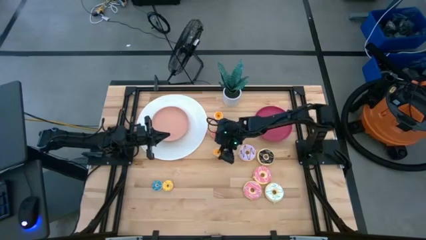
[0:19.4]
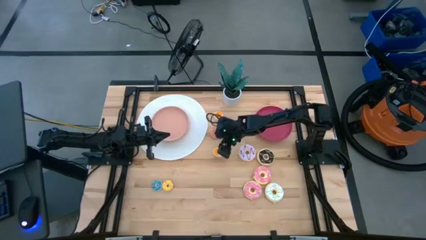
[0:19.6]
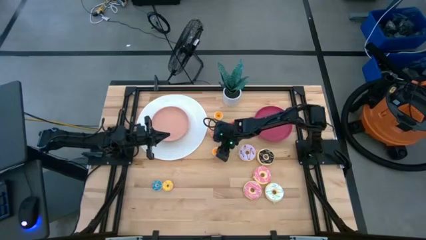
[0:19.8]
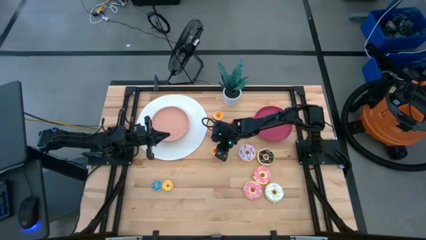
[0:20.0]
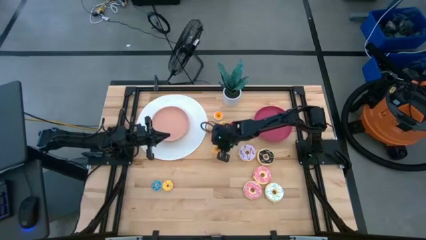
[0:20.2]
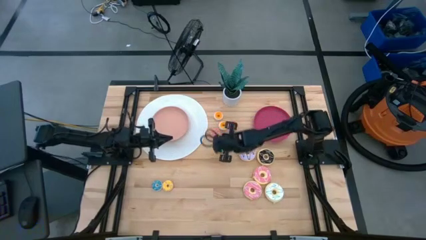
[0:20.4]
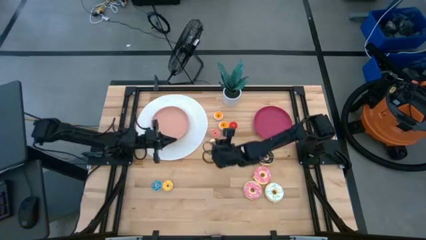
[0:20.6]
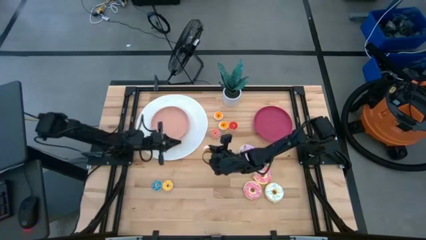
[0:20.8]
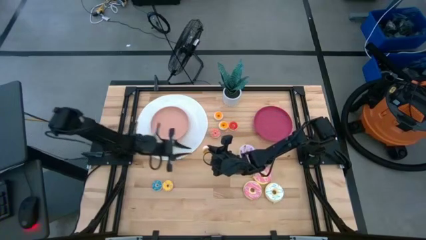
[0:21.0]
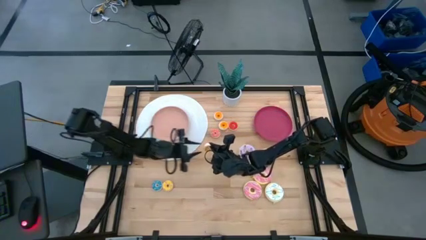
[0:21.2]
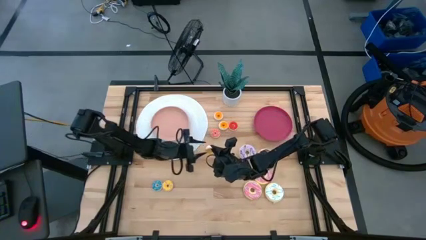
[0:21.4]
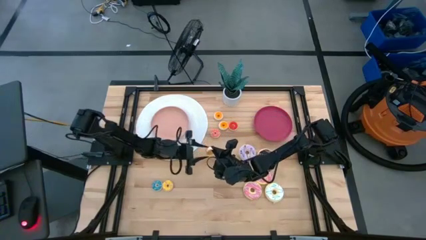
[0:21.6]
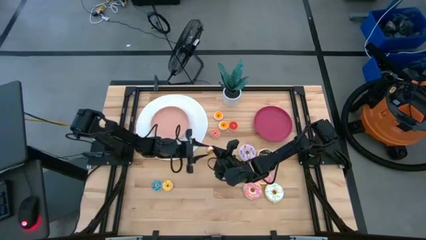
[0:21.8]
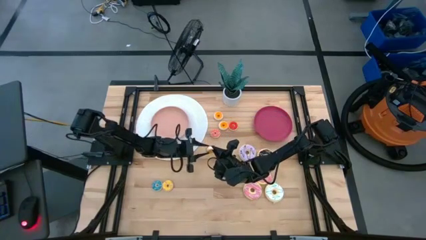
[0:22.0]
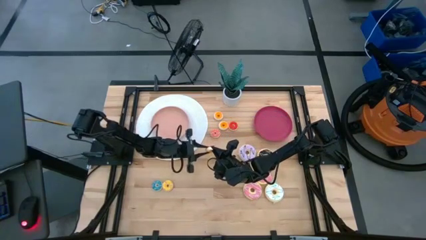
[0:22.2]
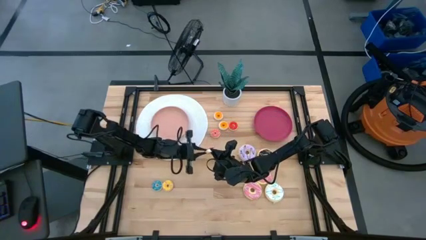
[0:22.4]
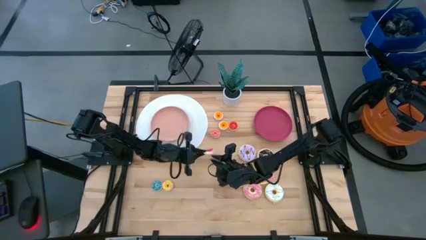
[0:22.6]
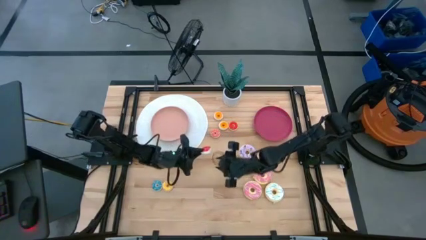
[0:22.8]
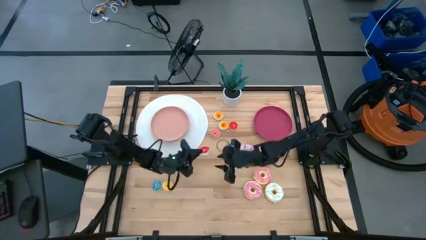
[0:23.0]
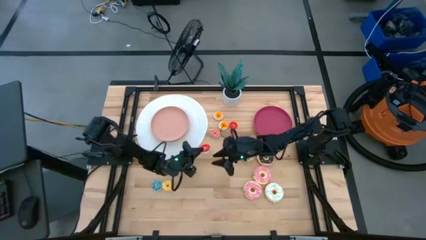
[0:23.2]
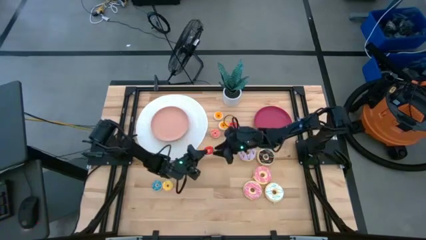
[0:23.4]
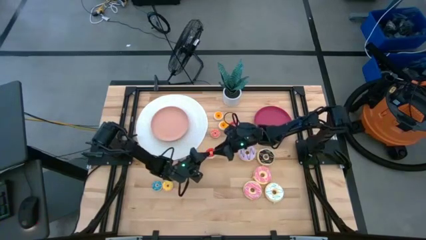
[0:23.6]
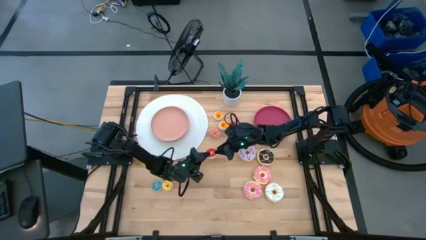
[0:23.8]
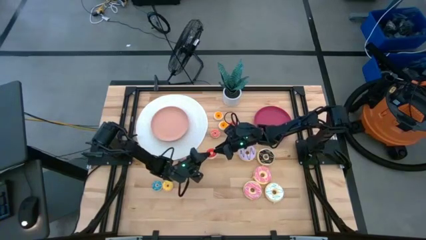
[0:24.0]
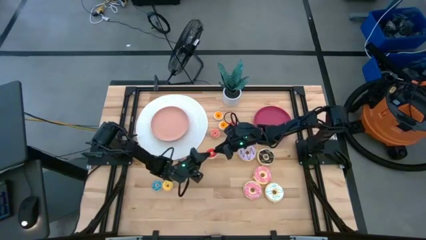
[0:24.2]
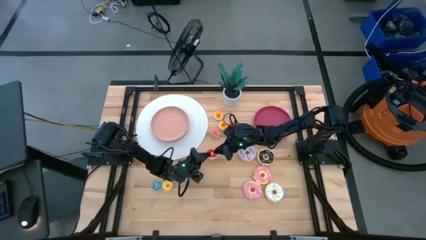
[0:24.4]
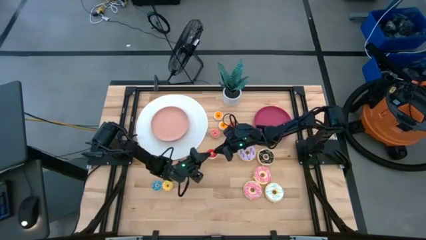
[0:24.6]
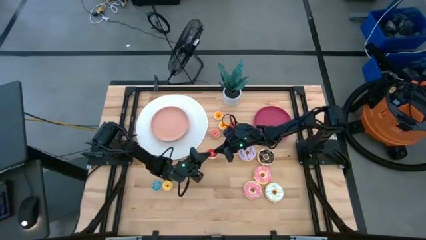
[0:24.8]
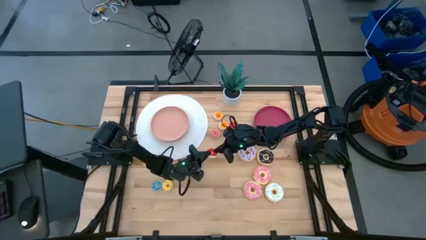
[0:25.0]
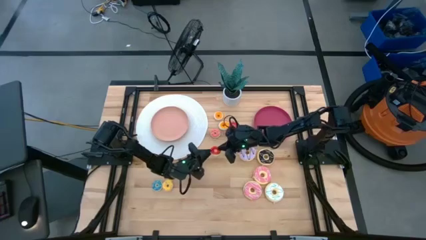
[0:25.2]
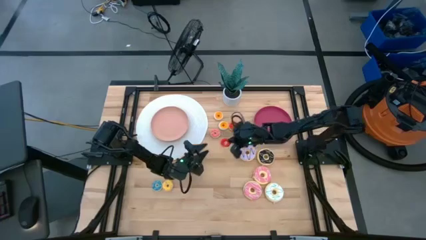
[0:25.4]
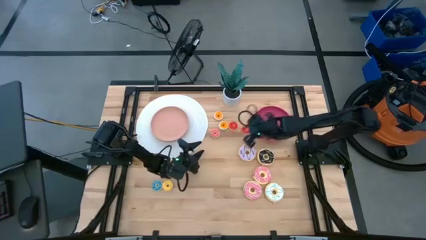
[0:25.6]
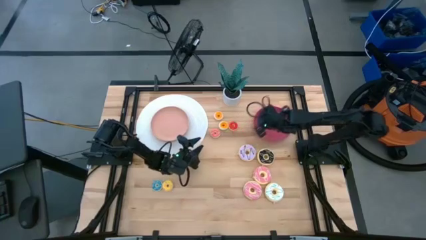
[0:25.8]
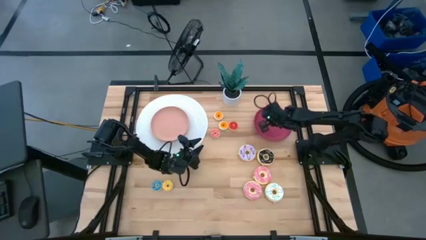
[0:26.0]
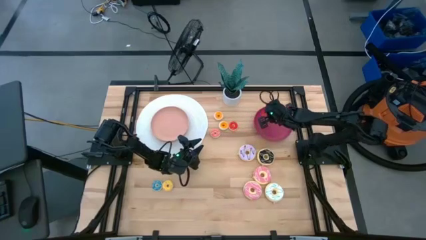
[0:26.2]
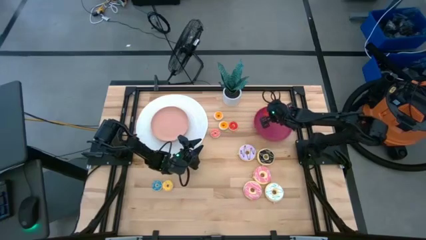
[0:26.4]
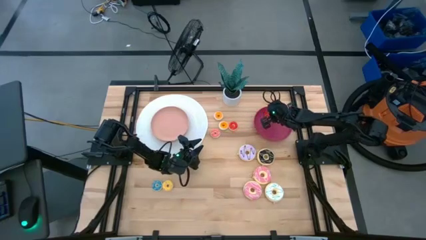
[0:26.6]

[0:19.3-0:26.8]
Task: Pick & Place donuts
Put the bottom small red donut on the red plate

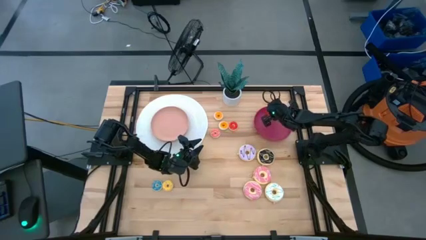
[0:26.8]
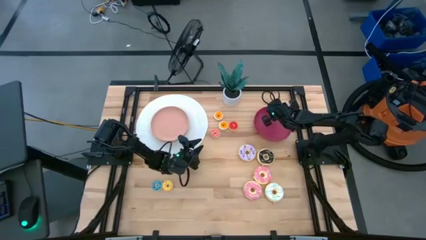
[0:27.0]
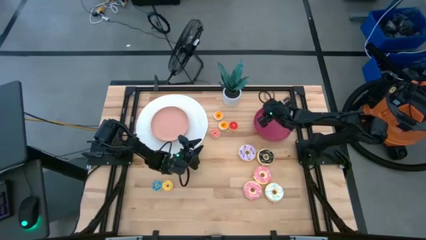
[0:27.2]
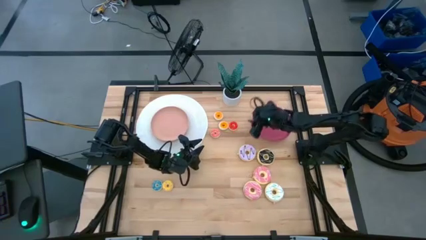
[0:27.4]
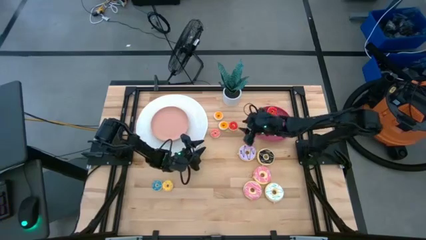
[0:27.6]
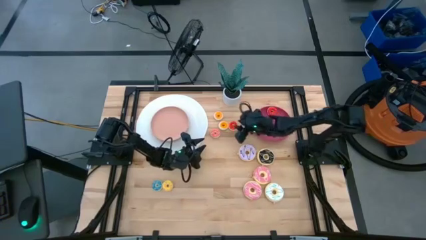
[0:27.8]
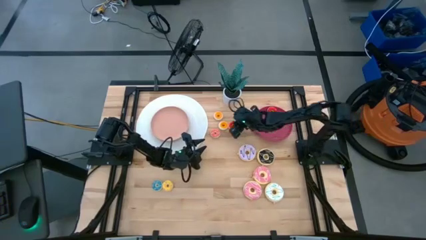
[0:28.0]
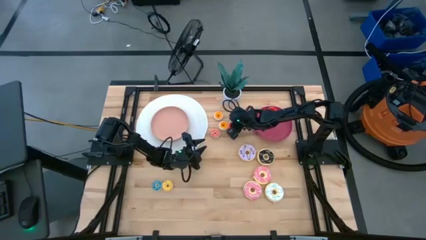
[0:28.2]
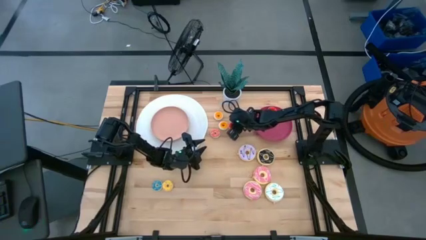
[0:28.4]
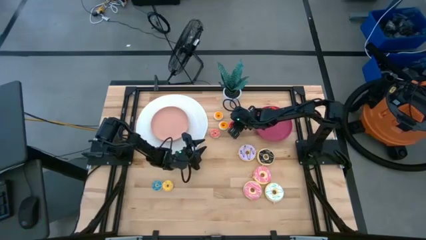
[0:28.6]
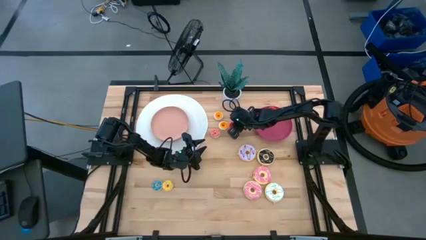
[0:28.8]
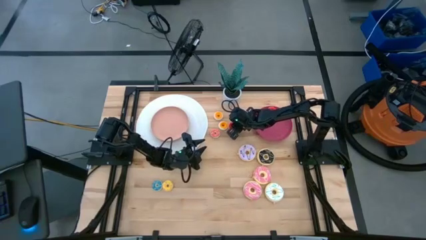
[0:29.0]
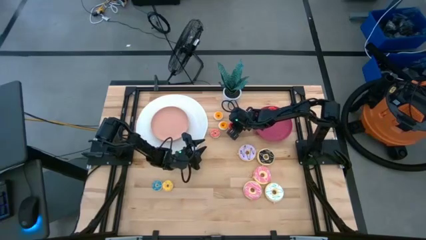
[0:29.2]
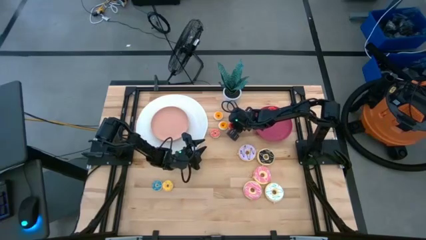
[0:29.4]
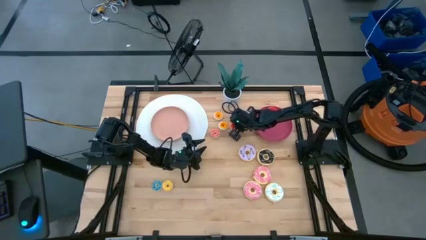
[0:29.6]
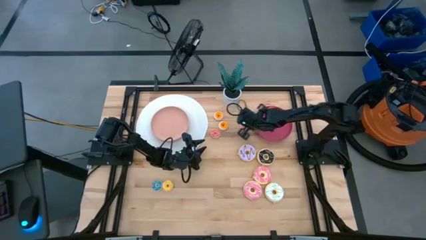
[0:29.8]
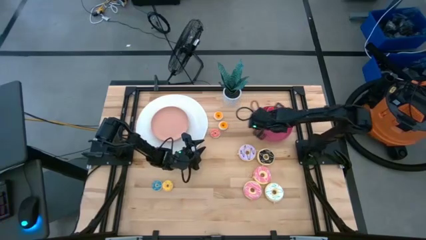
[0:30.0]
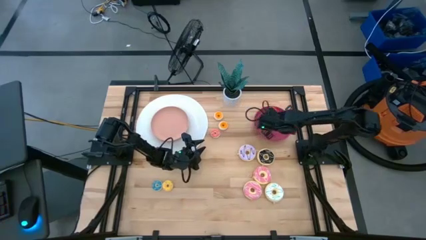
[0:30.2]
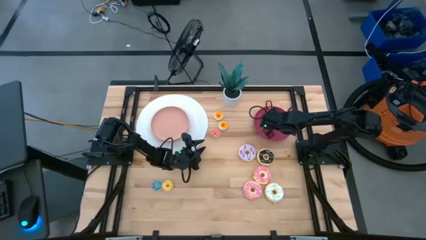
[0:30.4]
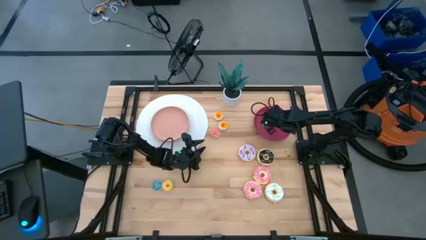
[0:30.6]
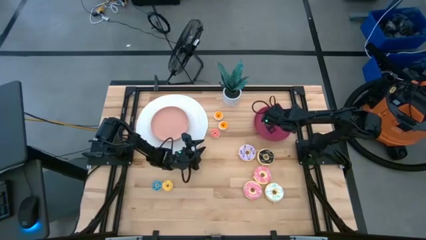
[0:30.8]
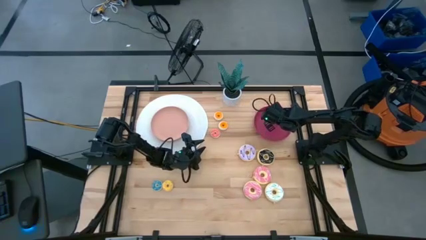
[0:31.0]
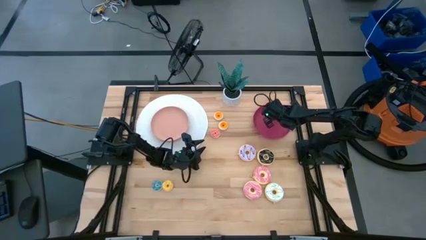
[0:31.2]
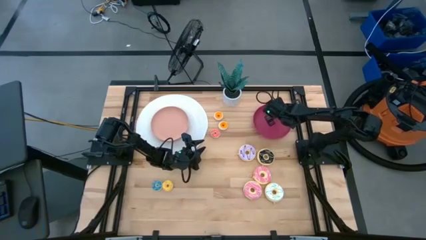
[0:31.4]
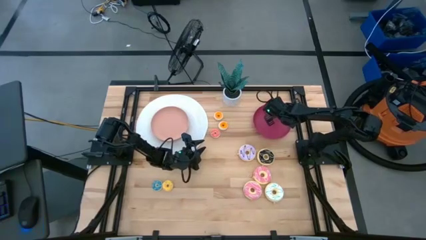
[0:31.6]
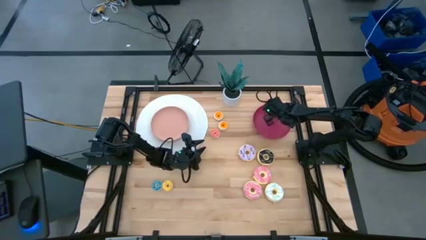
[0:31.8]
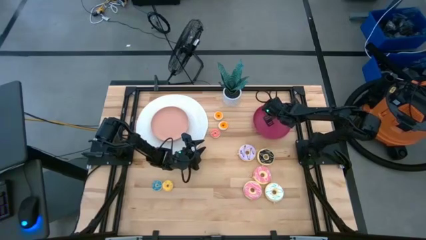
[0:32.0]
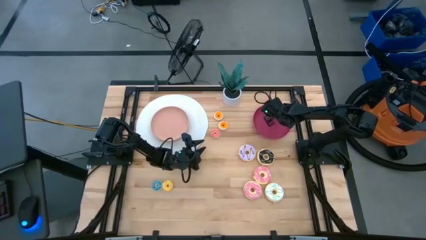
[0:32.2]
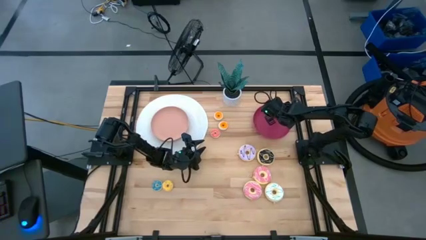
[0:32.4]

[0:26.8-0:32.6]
Put the small red donut on the red plate

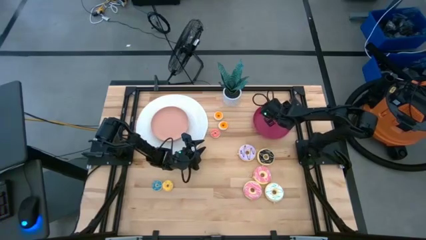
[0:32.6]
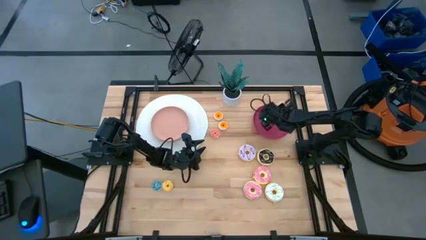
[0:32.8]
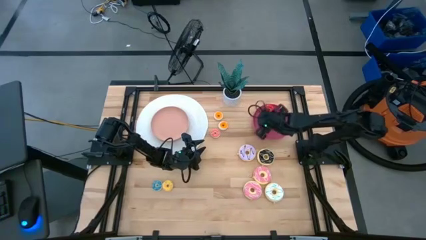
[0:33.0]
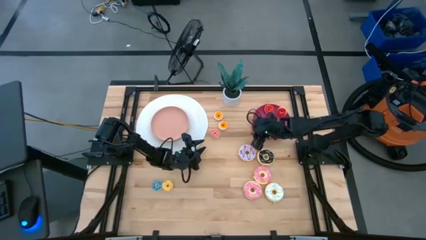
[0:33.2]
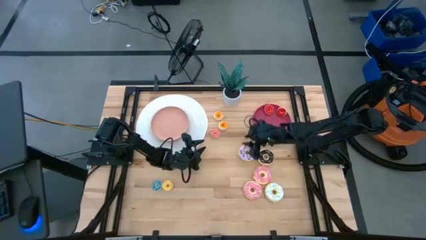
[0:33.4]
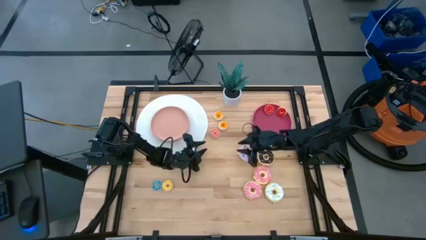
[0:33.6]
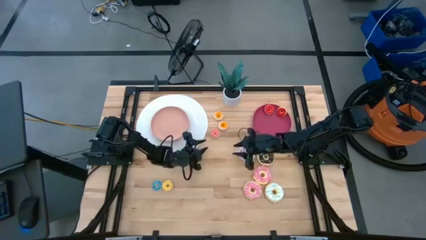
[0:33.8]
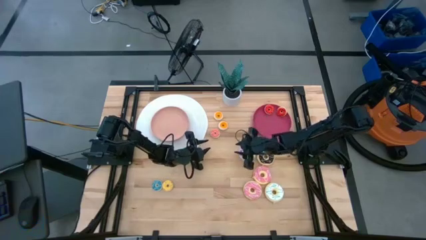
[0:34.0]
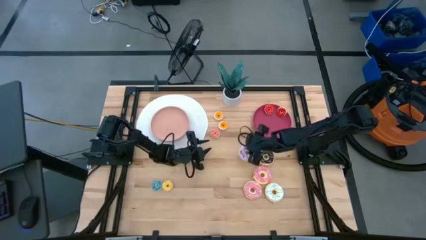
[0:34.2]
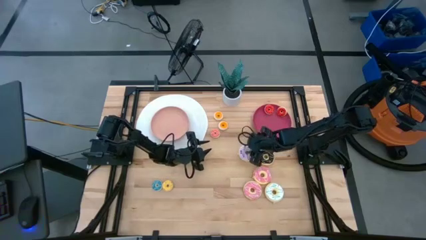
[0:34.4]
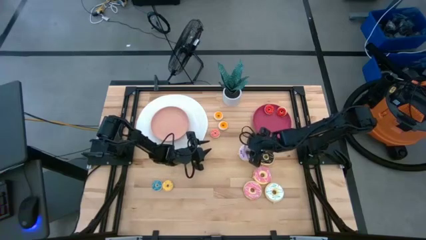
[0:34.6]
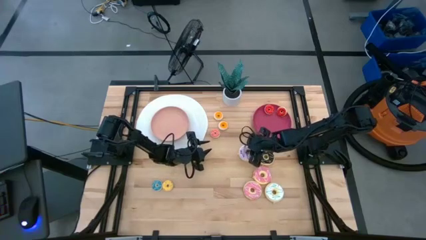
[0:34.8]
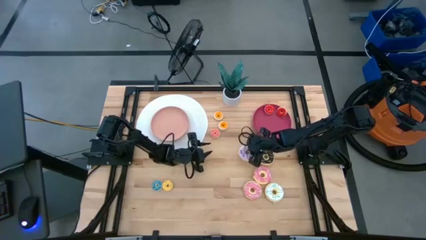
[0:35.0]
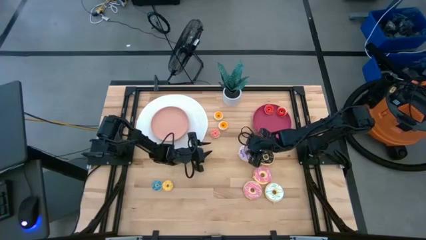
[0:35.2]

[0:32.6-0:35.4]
Put the large purple donut on the pink plate
